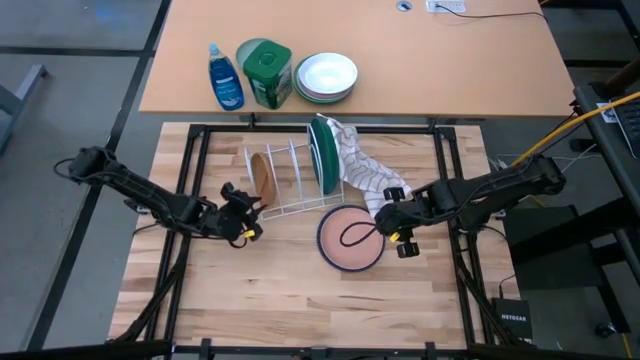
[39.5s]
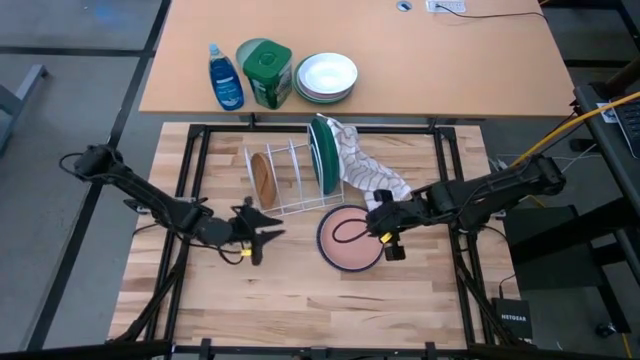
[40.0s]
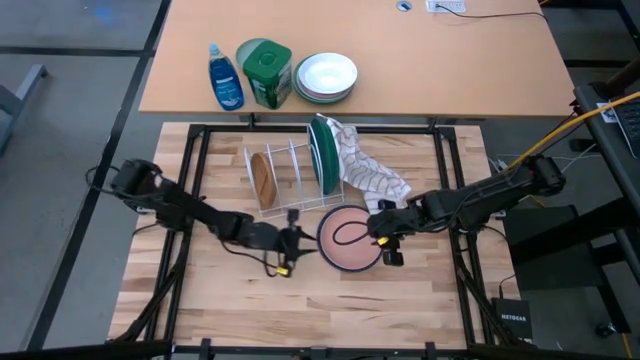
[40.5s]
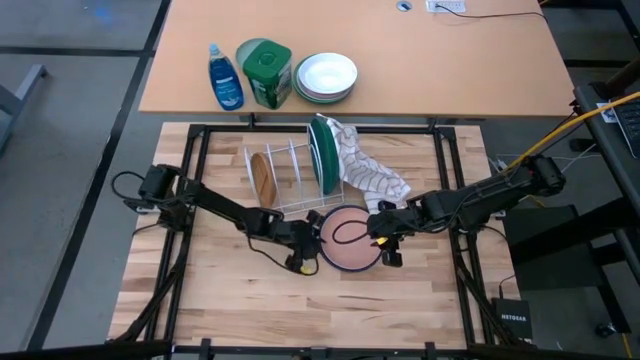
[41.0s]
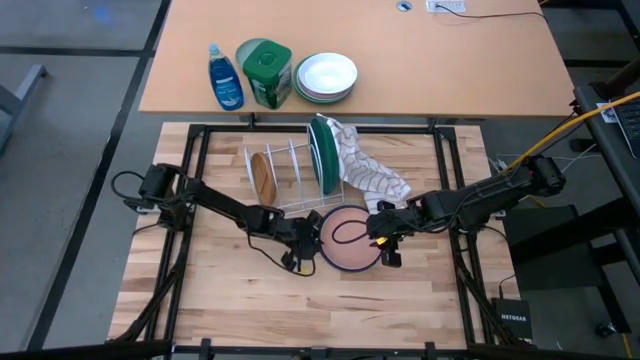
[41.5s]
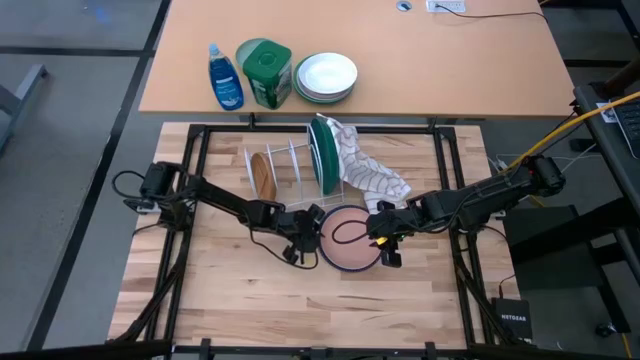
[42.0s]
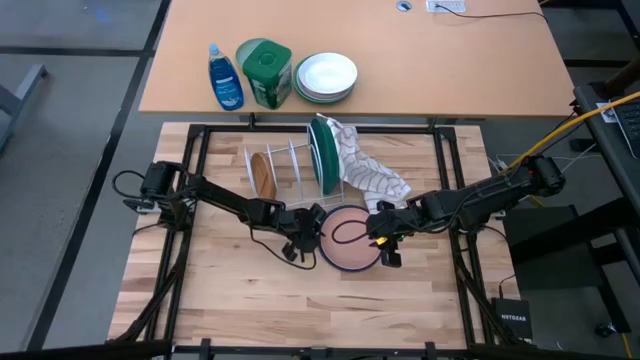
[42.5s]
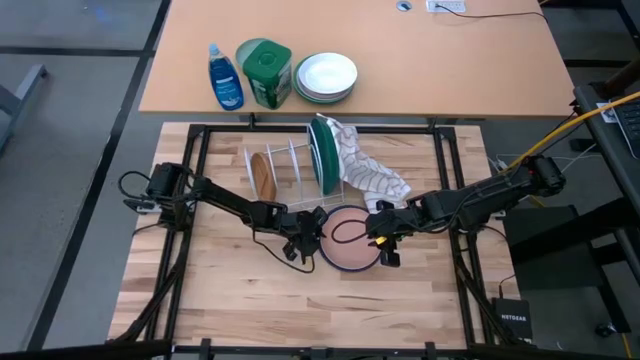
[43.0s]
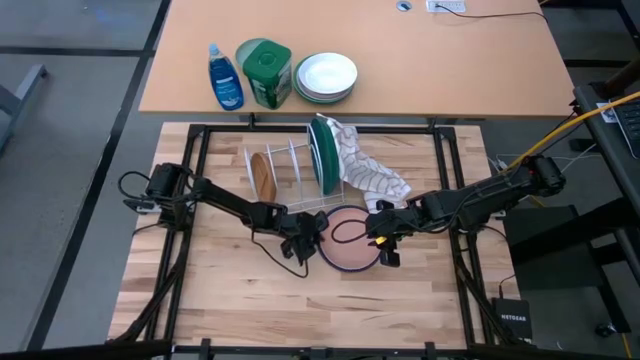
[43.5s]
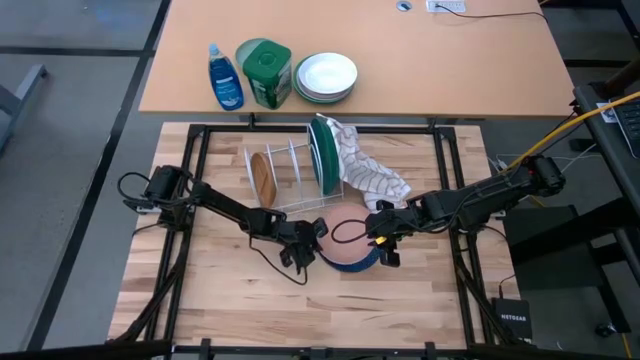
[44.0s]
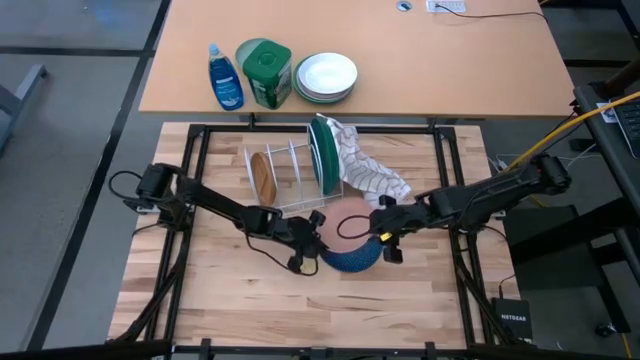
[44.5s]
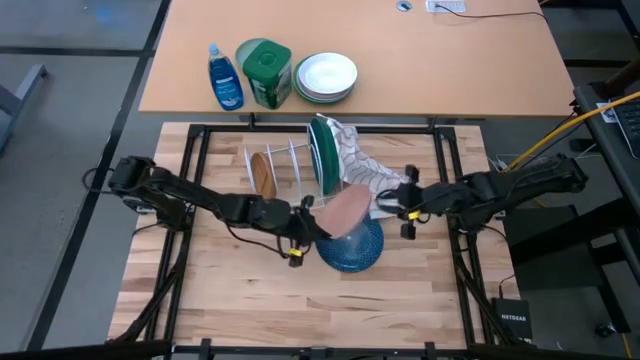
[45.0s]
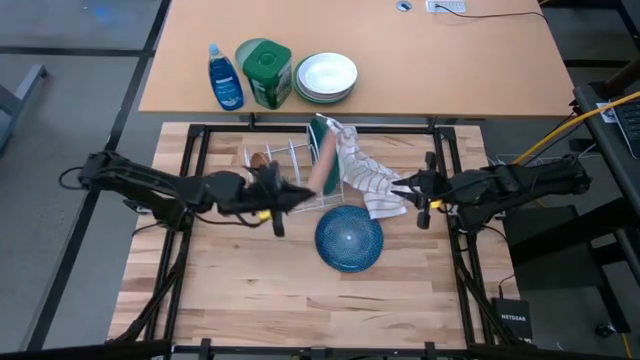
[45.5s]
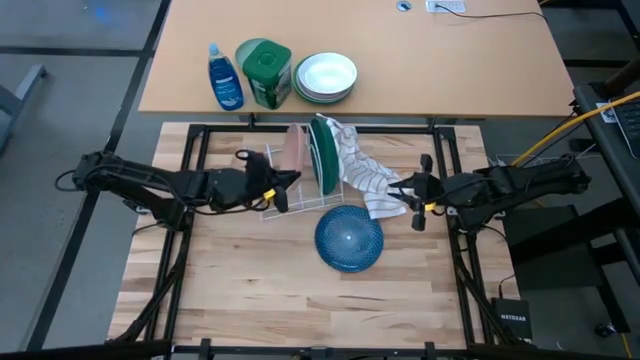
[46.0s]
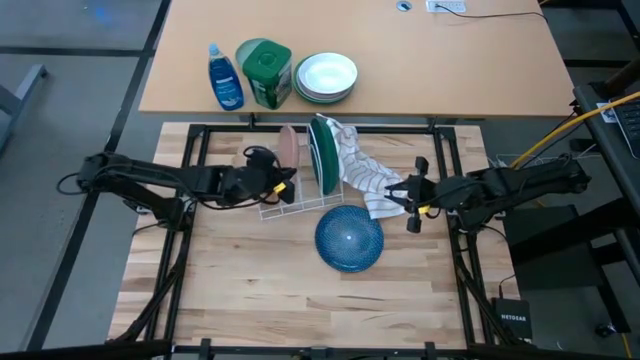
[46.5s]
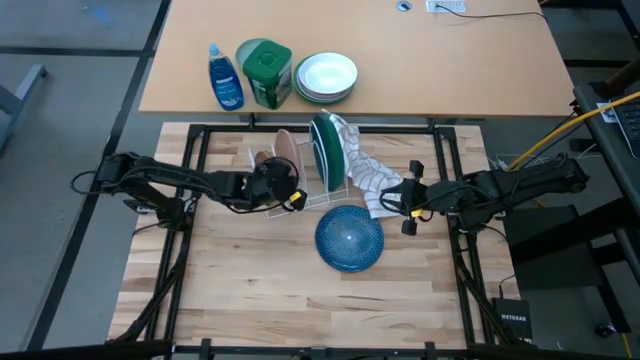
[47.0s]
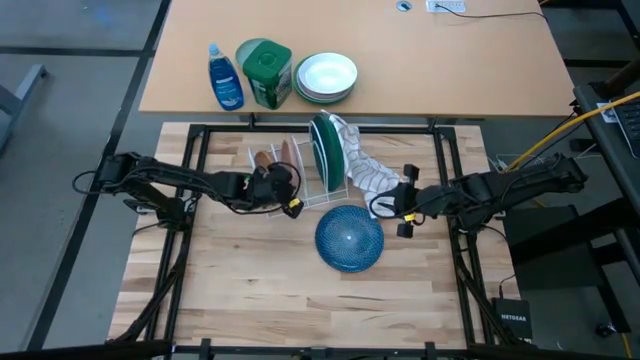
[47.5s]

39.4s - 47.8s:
Task: Sort dishes
Put the pink plate into the dish rack

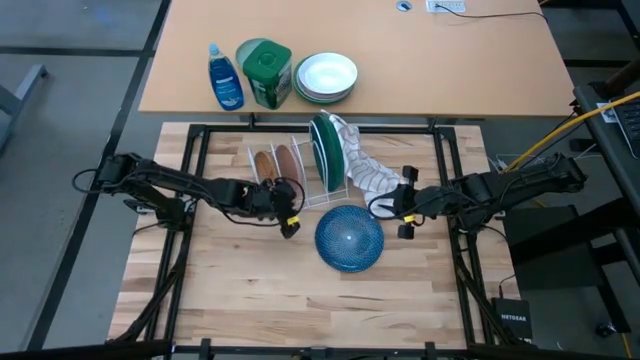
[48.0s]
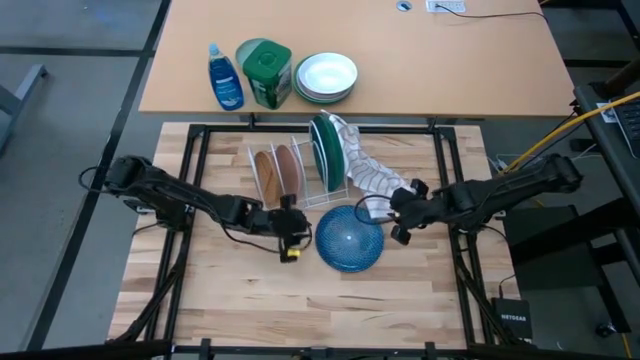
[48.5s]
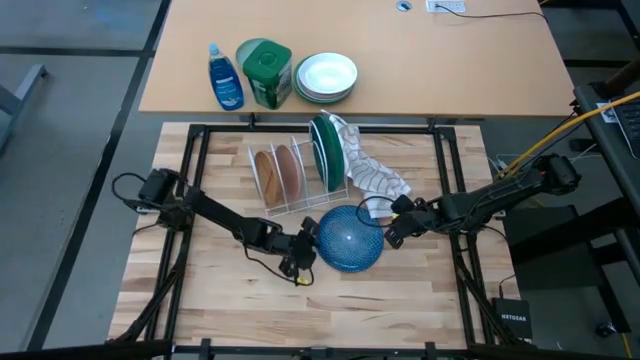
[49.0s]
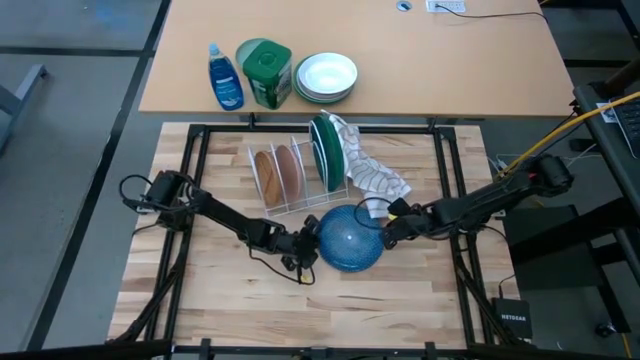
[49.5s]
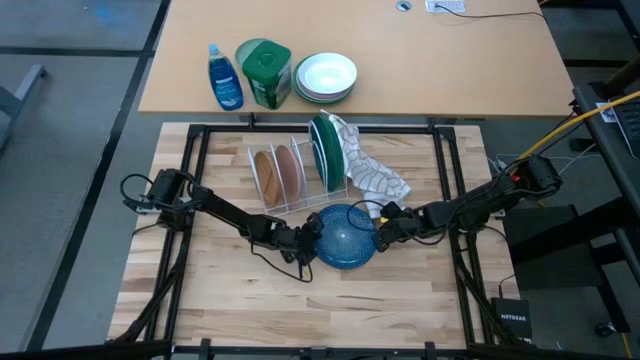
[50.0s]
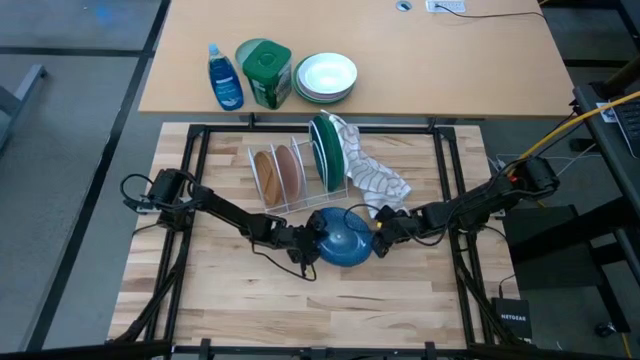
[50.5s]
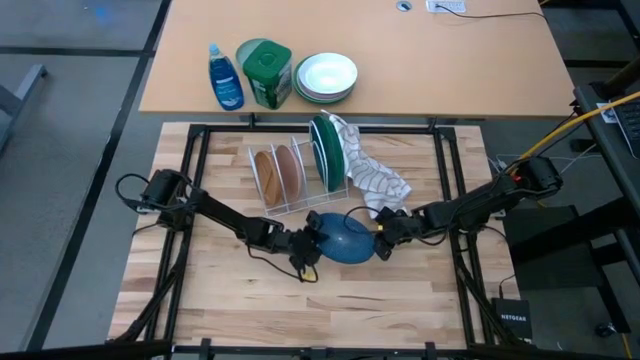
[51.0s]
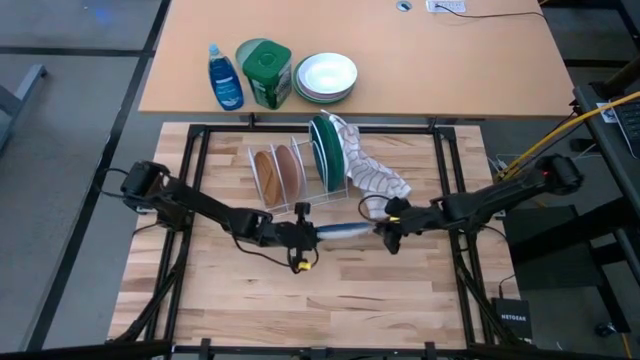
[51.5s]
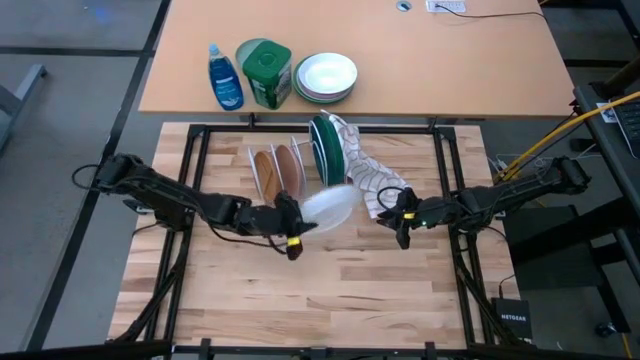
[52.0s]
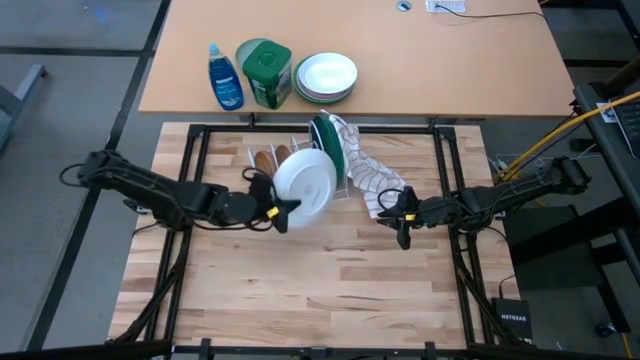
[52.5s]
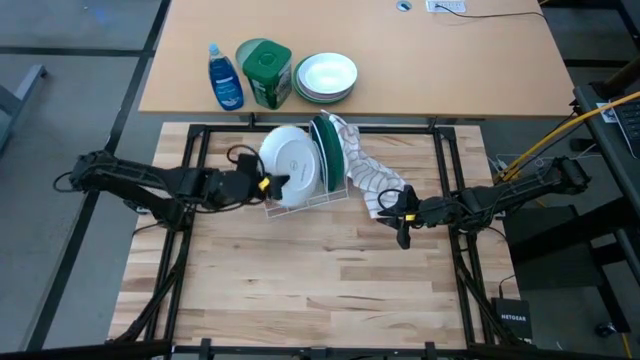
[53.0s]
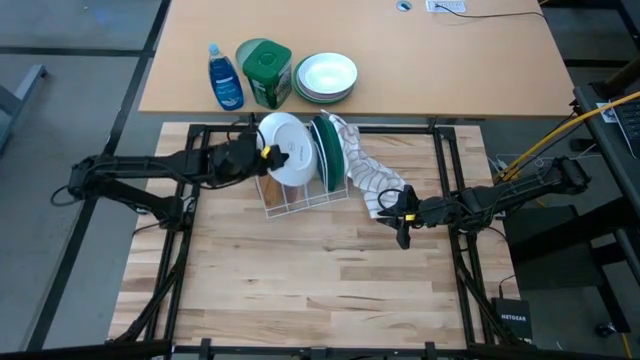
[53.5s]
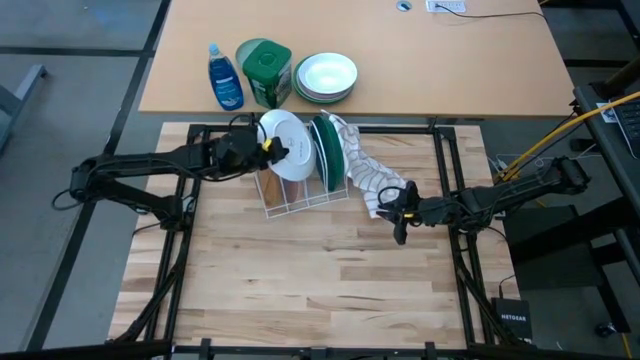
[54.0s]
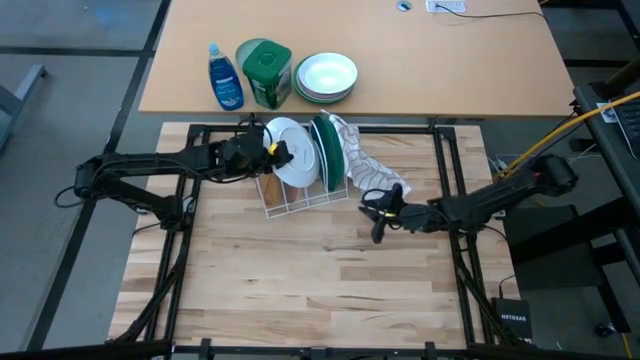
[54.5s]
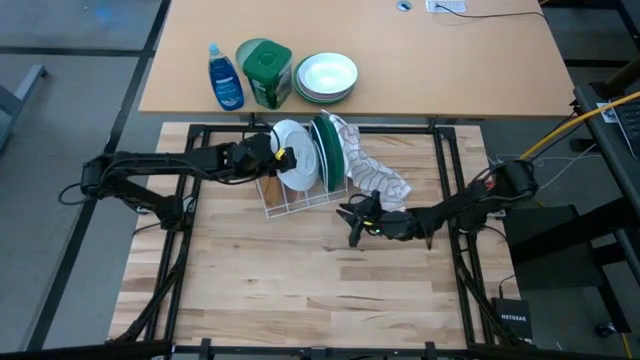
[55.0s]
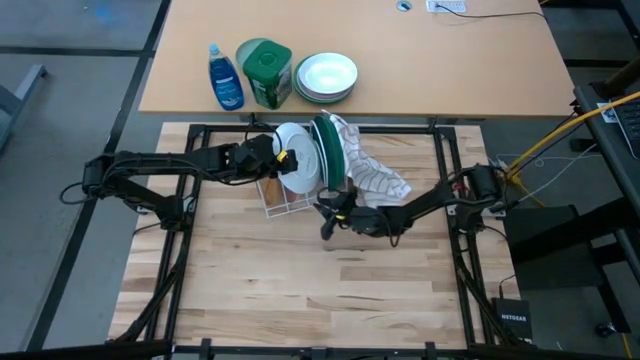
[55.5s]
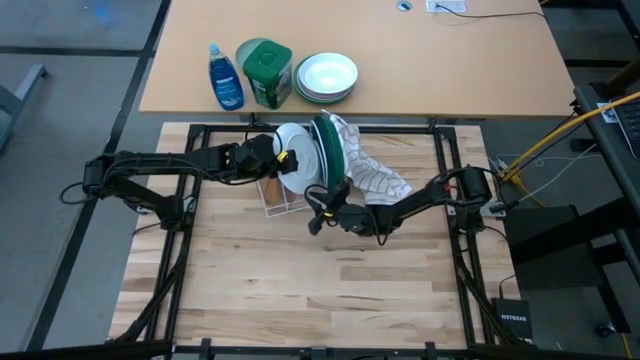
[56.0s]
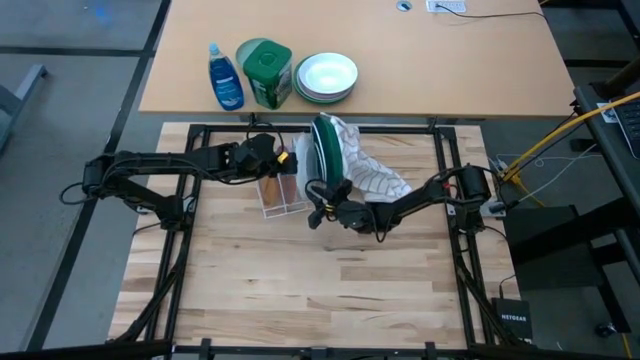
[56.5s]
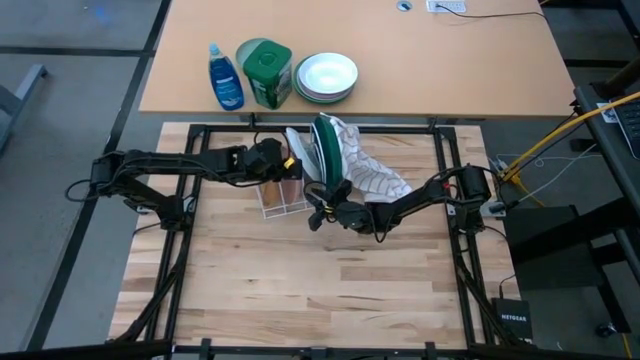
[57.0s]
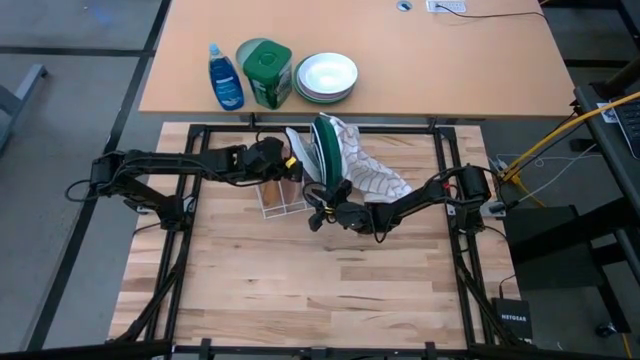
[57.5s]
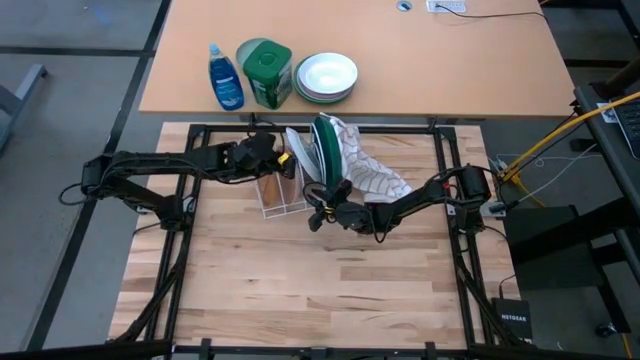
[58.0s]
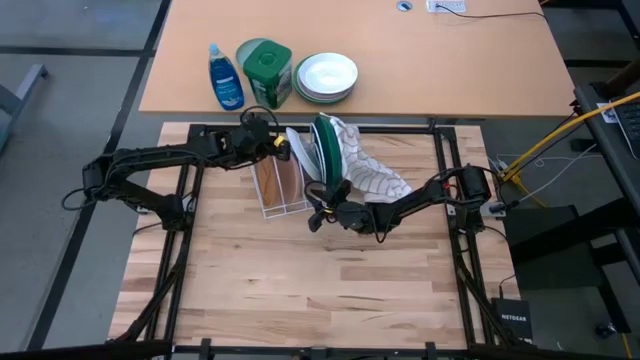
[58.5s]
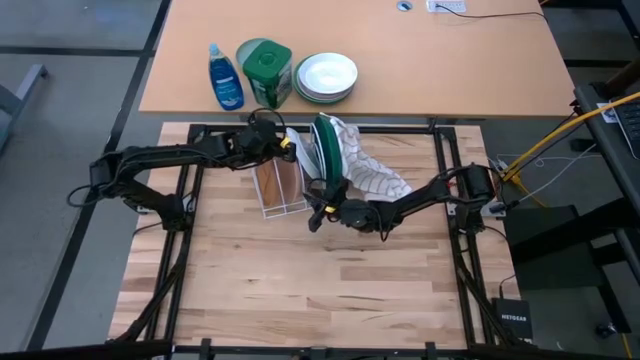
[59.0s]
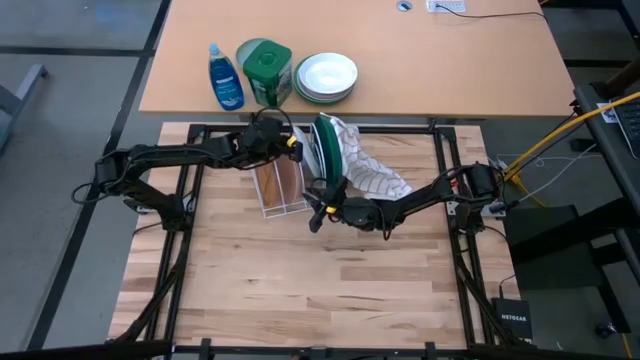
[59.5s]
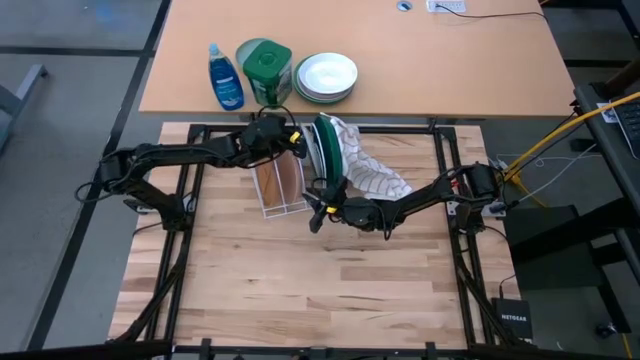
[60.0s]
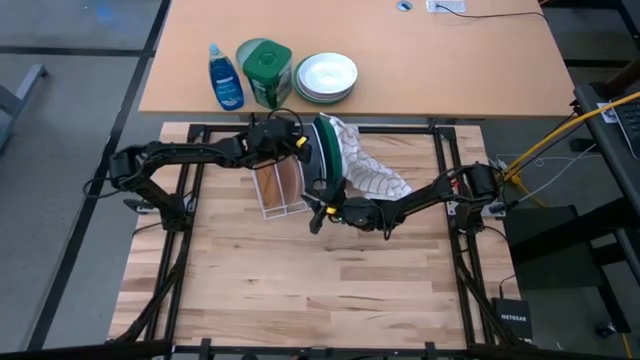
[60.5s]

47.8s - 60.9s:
Put the blue plate into the dish rack

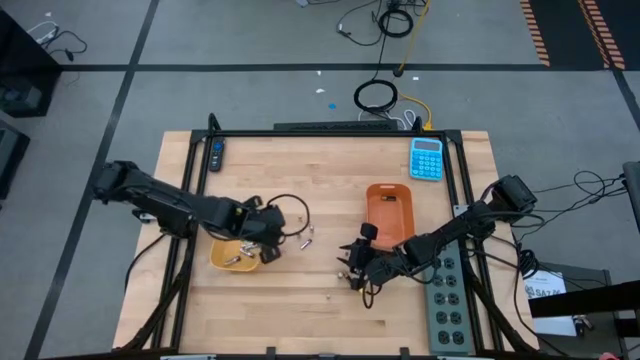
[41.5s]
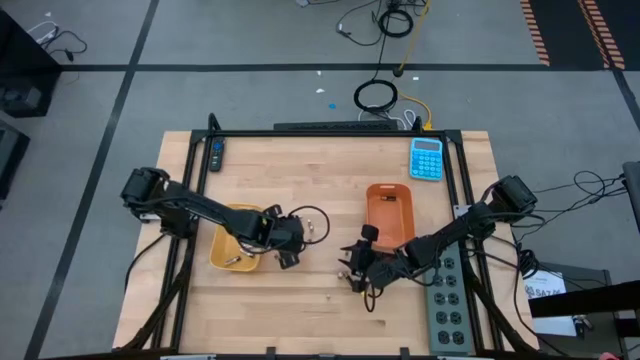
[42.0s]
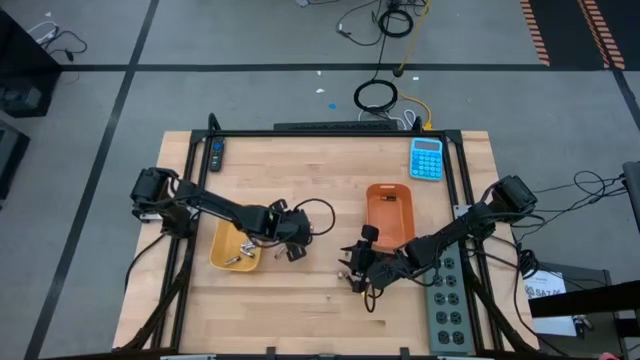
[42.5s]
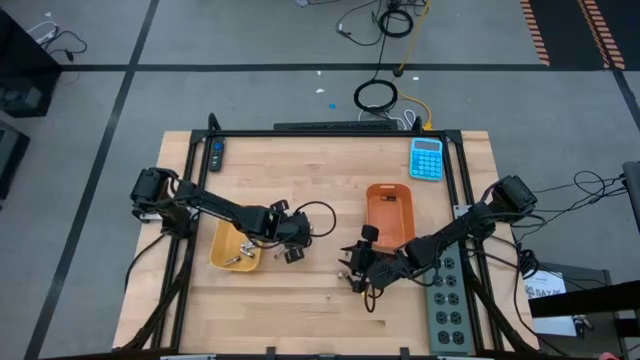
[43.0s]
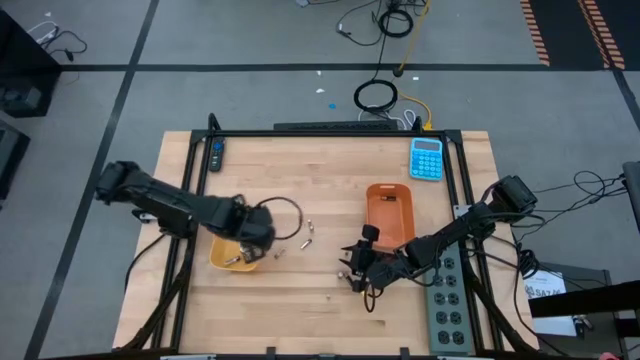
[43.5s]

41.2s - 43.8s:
Task: Sort batteries
Put the silver battery into the yellow bin
